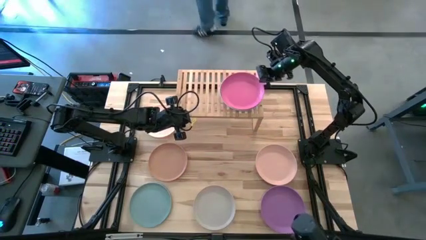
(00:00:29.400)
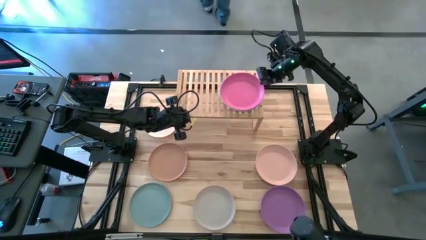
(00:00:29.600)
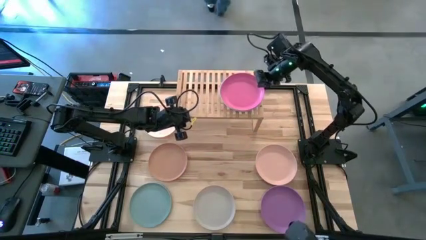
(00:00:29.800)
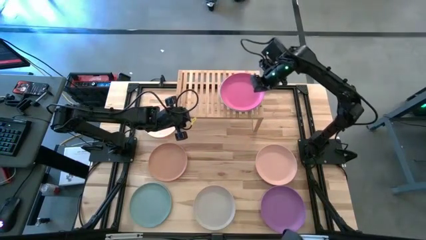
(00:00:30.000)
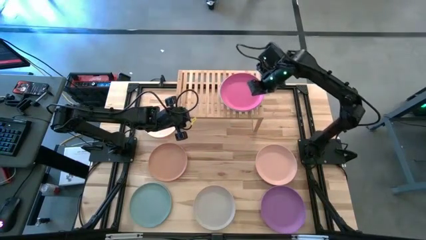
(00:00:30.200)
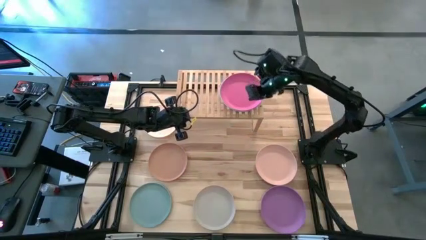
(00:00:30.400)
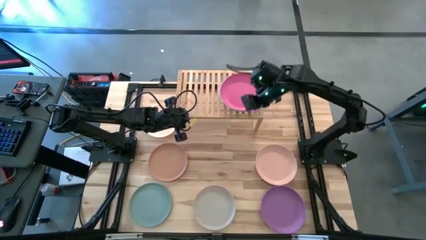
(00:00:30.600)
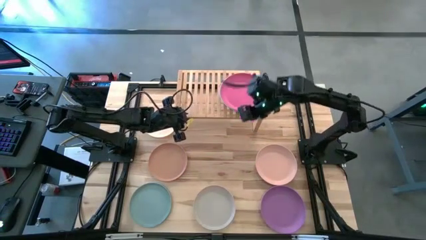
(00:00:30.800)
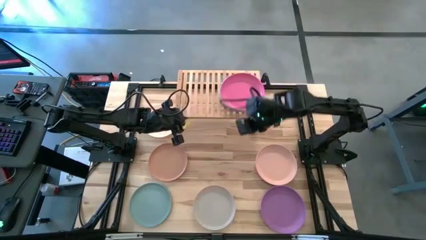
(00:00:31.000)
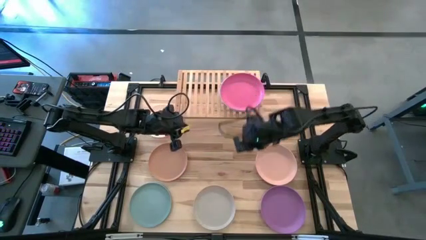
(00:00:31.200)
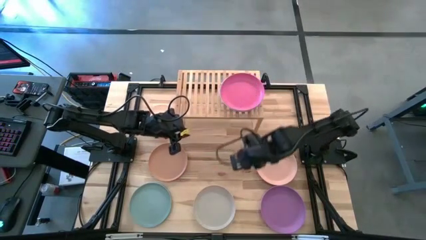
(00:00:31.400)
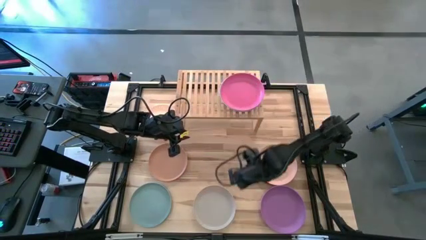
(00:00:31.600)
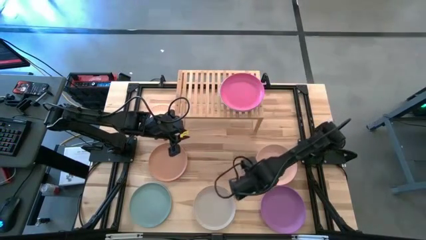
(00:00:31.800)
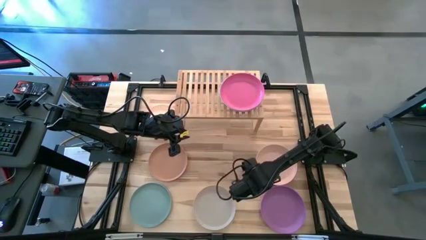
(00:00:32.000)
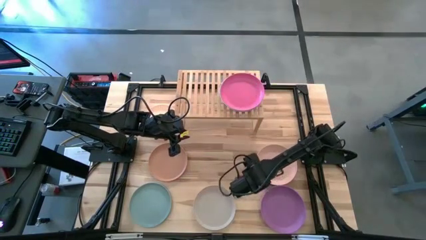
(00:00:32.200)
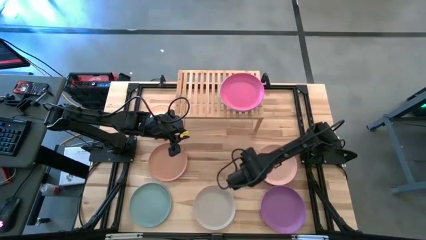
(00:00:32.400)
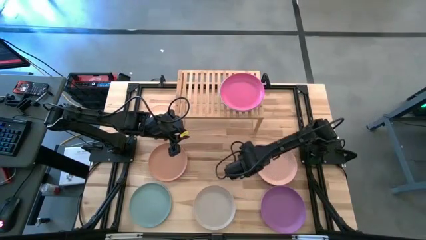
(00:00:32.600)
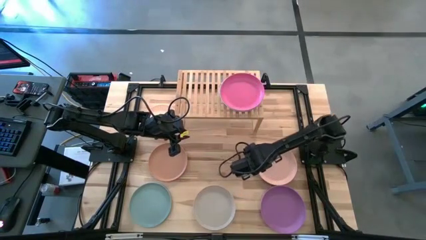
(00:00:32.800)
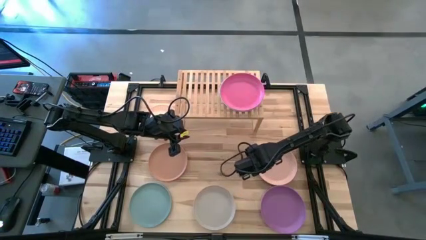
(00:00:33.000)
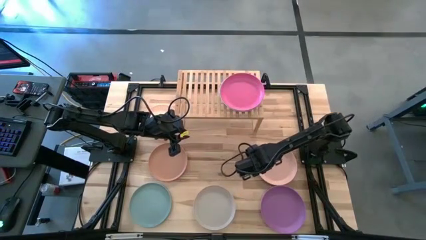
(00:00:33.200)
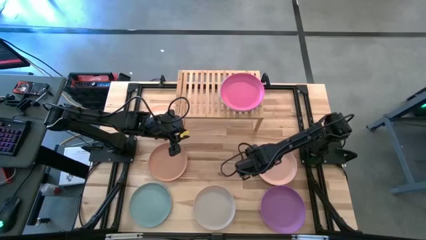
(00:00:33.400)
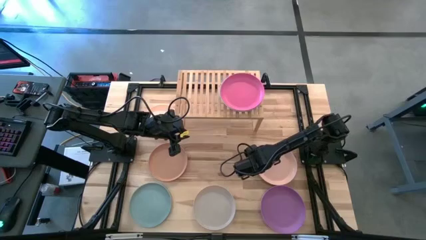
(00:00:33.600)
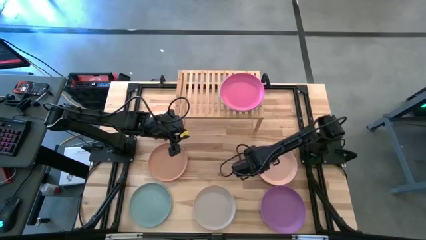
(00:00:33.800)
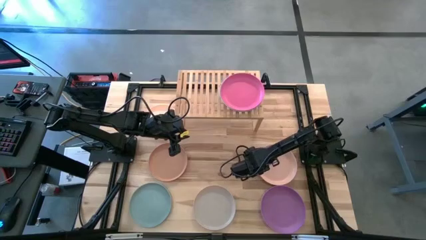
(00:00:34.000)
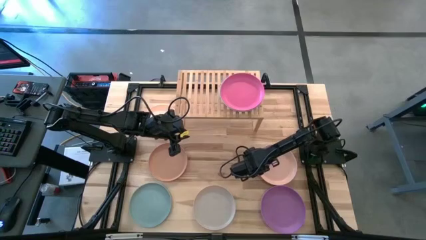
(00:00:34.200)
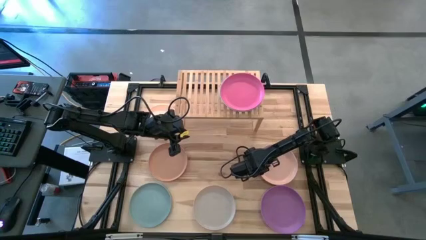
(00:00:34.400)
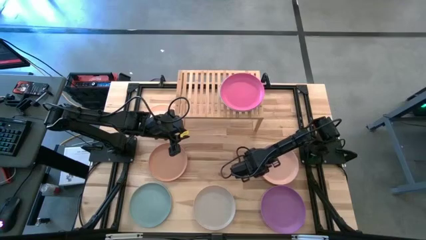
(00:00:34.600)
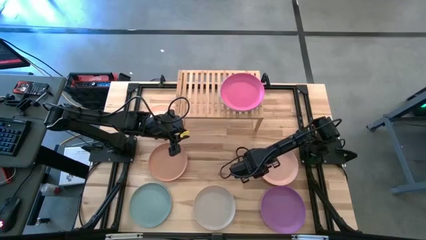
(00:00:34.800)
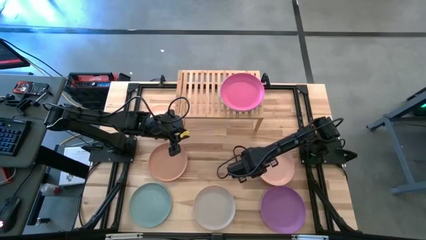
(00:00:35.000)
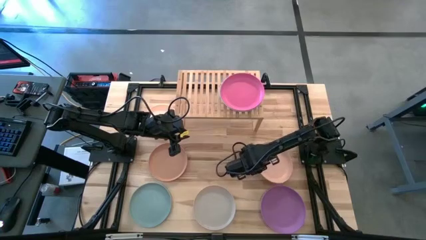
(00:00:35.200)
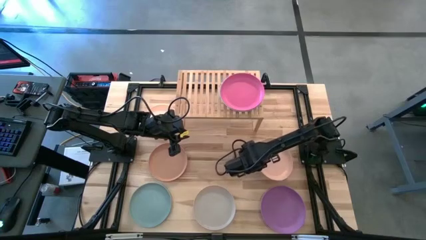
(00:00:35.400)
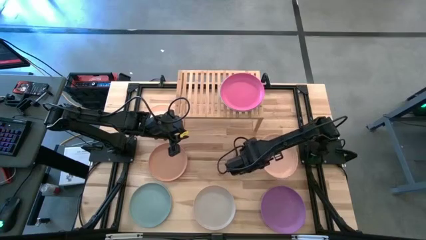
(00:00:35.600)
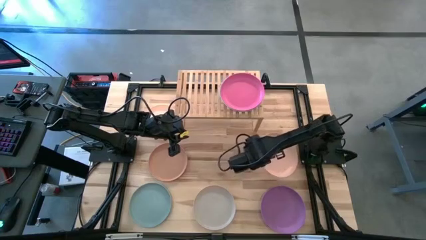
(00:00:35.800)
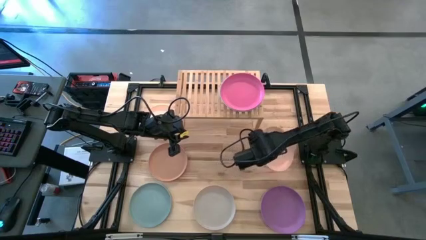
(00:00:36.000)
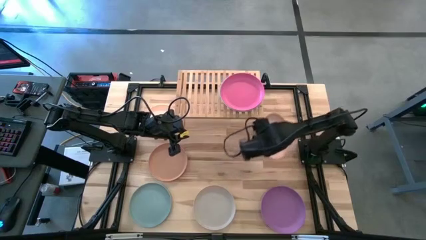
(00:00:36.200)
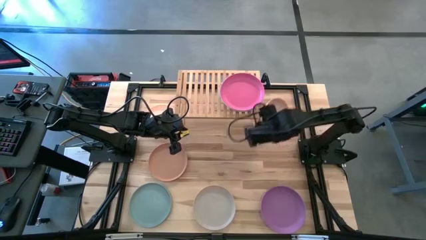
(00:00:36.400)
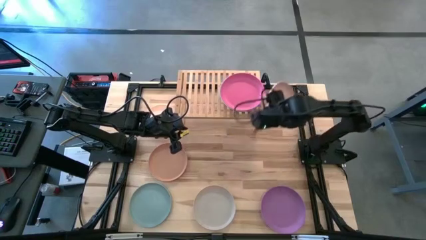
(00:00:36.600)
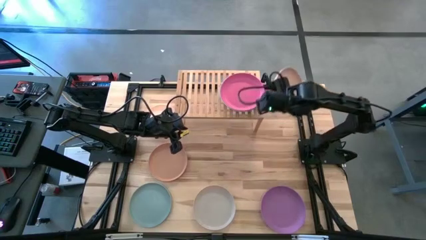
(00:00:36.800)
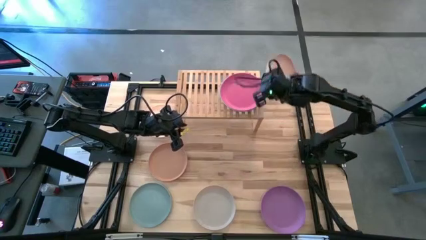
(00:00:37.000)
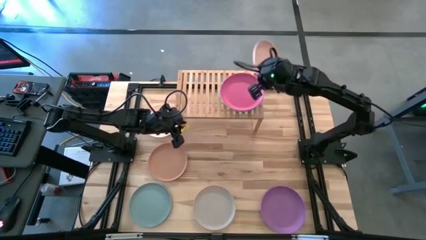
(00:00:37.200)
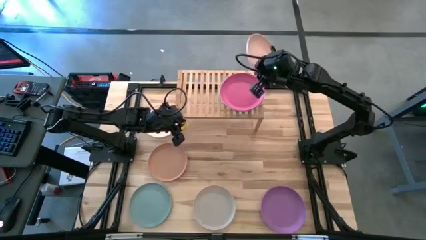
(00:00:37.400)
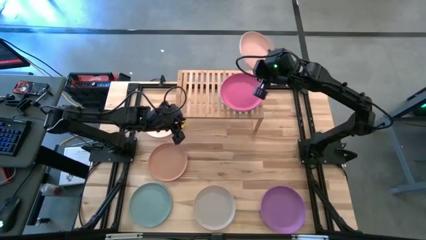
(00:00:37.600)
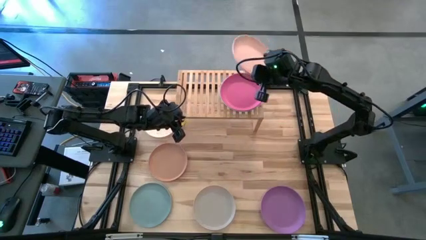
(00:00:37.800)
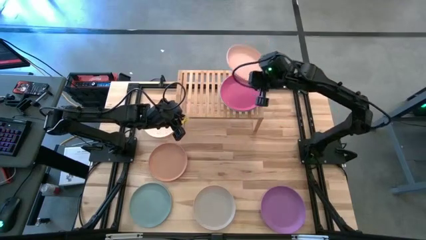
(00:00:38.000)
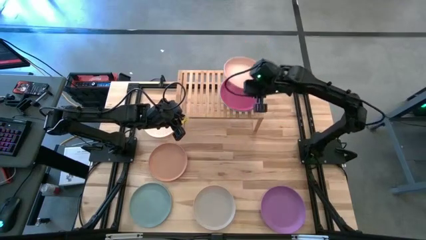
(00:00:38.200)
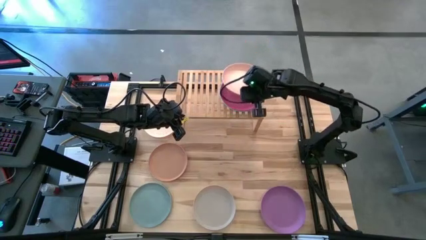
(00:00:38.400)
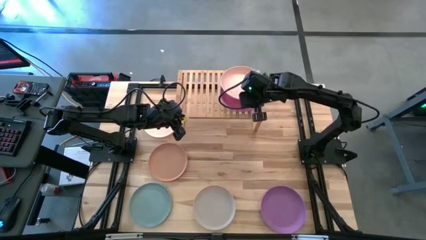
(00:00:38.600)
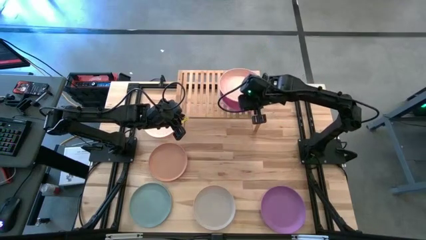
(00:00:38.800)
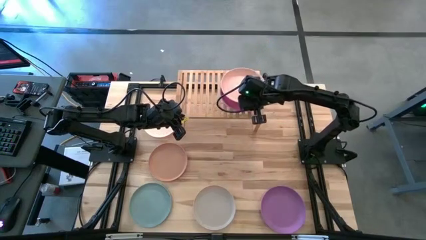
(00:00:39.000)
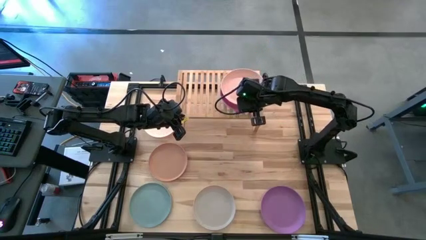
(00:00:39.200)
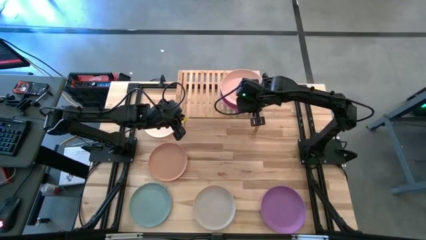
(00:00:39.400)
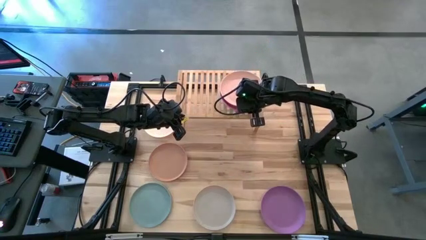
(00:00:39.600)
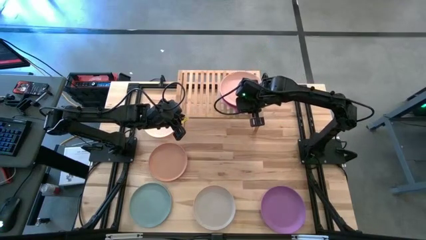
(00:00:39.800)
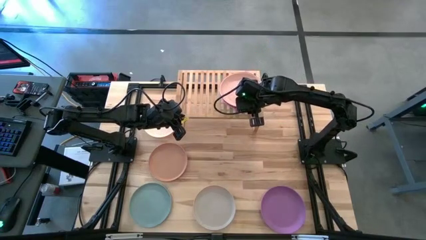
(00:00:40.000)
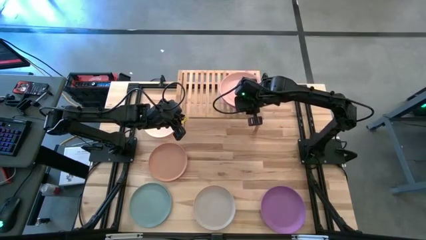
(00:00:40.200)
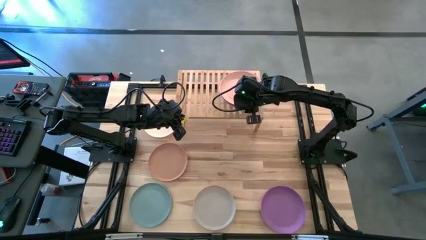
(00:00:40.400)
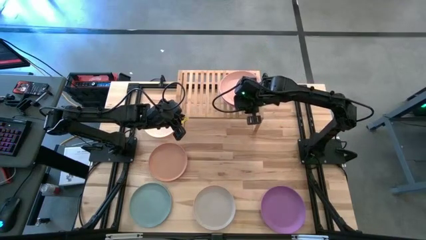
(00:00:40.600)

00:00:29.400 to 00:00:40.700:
Task: Place and stack plates onto a shelf
Stack the light orange plate on top of the pink plate on the shelf
